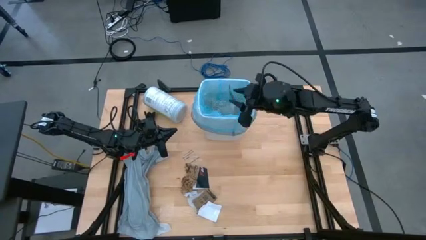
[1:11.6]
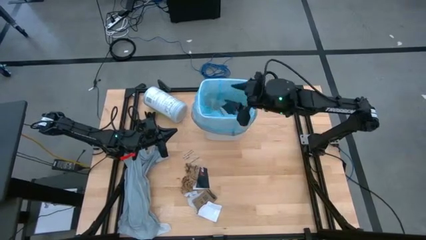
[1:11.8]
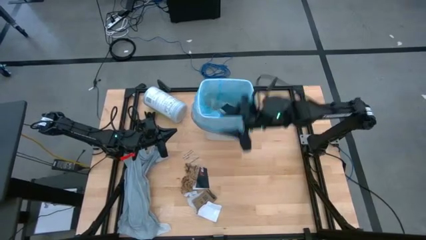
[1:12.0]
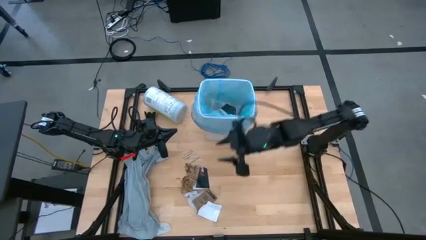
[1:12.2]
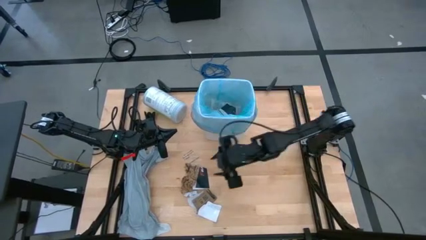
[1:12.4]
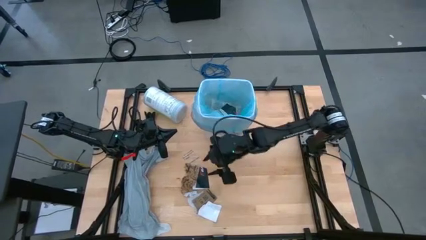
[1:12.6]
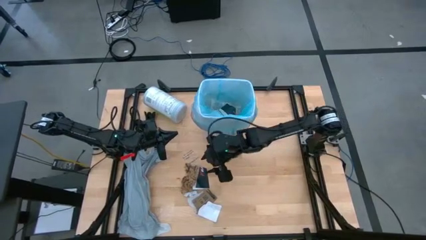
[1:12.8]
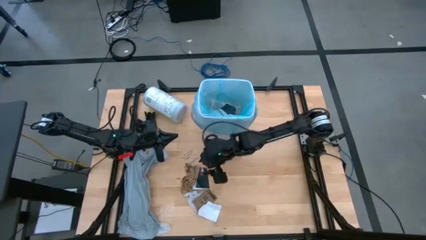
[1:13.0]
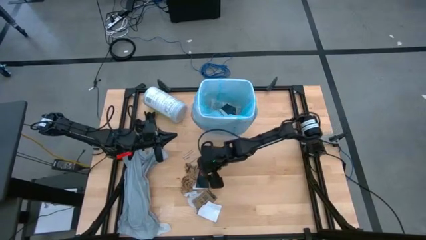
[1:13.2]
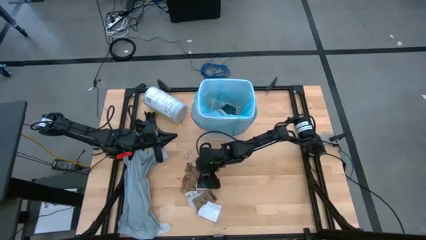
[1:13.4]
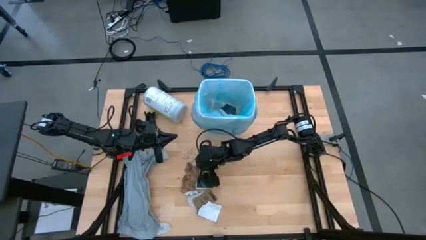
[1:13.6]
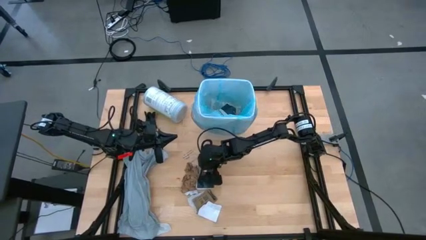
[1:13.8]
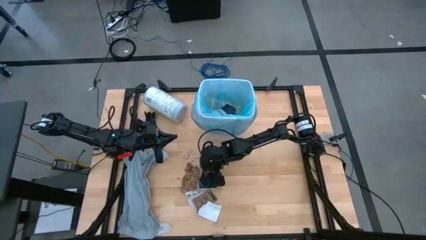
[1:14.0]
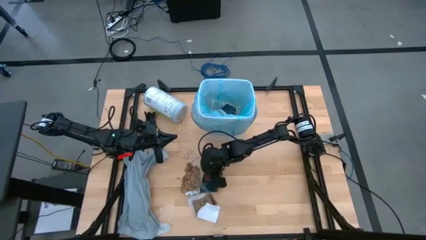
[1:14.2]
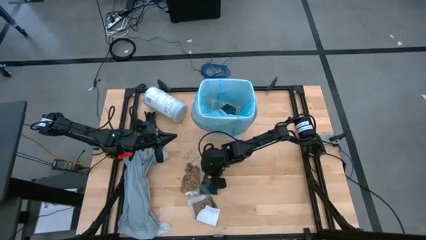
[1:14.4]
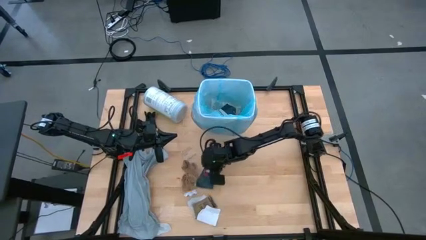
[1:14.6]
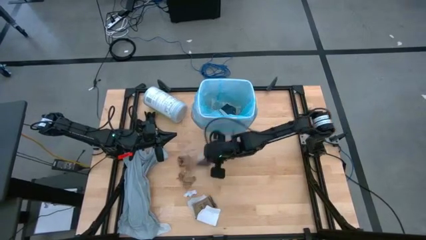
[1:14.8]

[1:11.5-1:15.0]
Task: place trash/remove bag and relplace
Put the white paper into the trash bin

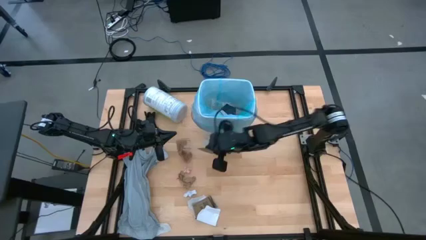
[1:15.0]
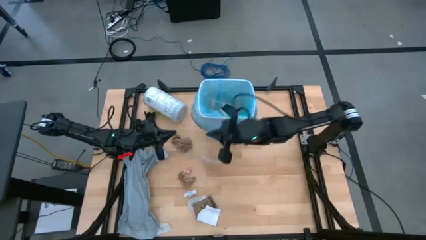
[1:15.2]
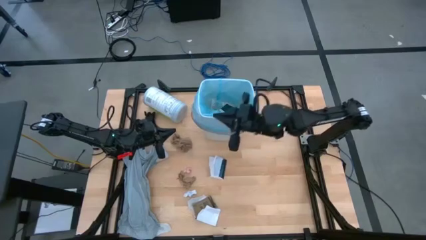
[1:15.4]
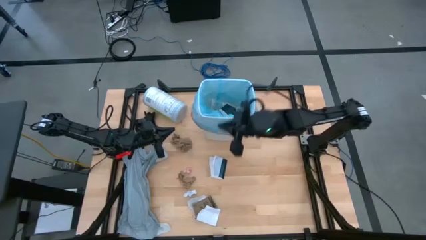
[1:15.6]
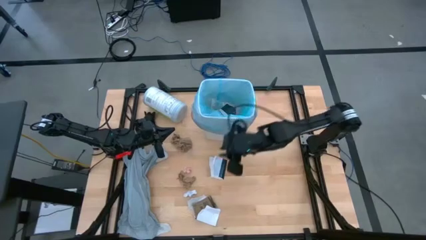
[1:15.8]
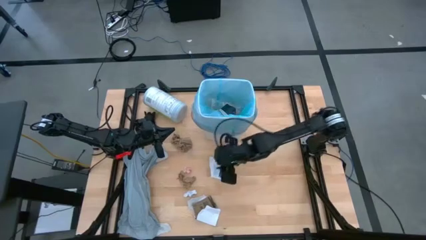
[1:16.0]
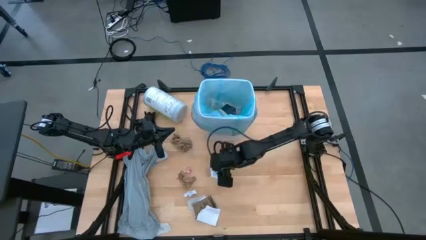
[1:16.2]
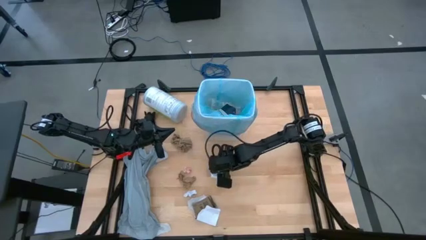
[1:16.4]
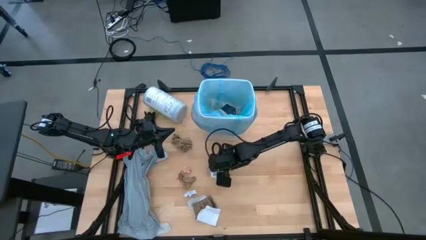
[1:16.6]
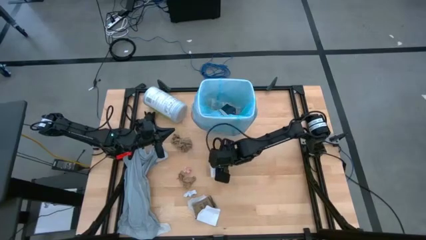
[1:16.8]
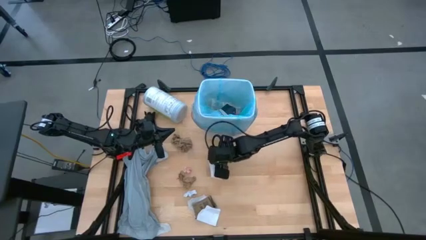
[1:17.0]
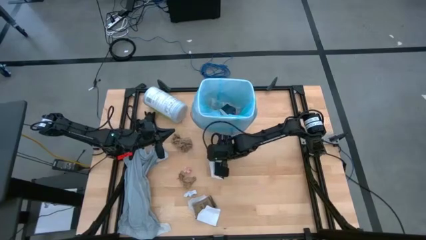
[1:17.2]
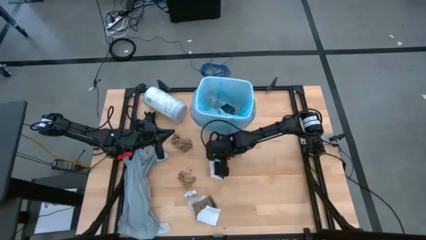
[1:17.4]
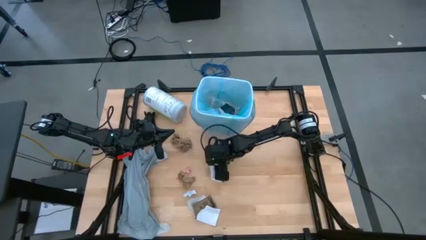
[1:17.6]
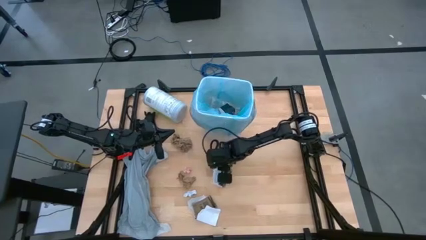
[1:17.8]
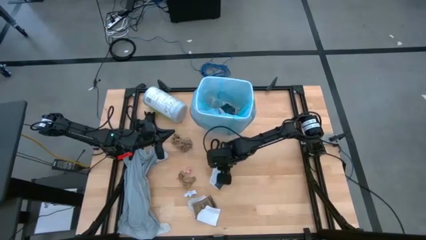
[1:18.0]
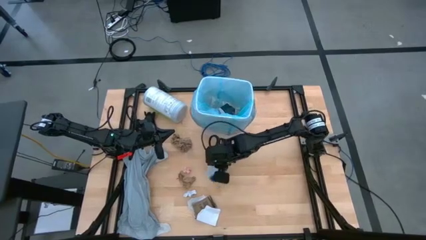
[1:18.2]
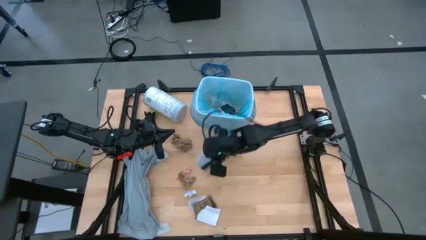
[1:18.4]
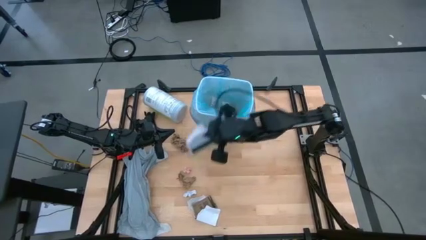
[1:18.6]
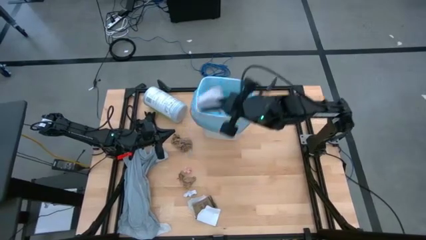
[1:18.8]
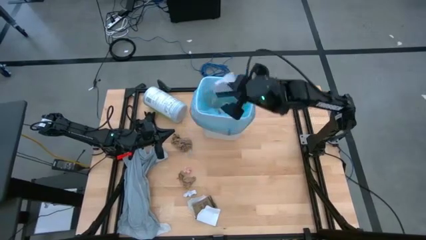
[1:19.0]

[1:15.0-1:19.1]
Put the white paper into the trash bin

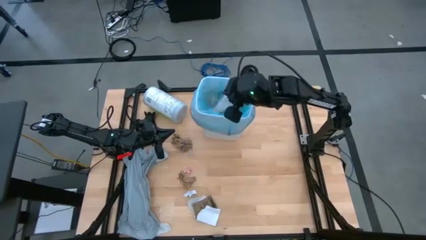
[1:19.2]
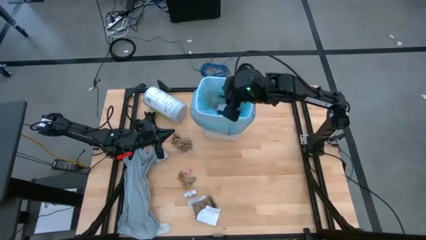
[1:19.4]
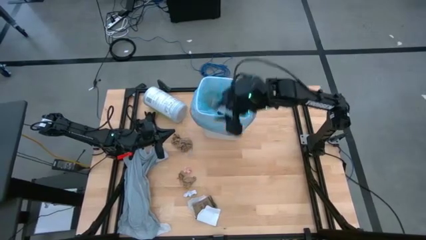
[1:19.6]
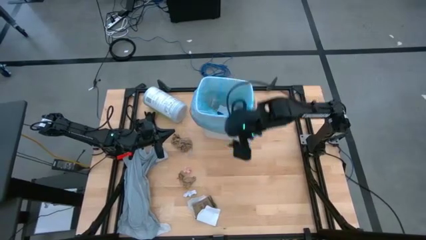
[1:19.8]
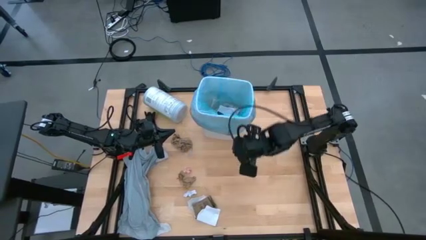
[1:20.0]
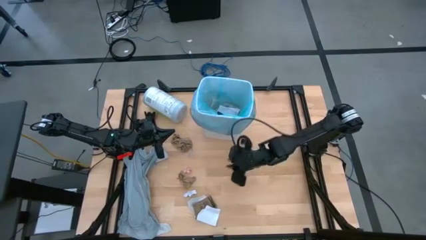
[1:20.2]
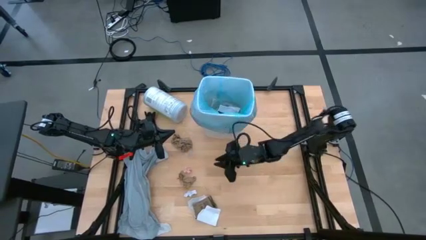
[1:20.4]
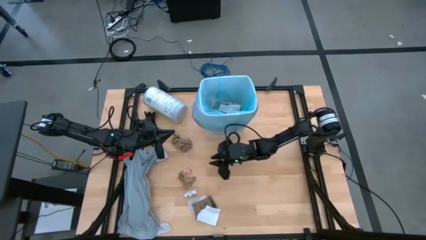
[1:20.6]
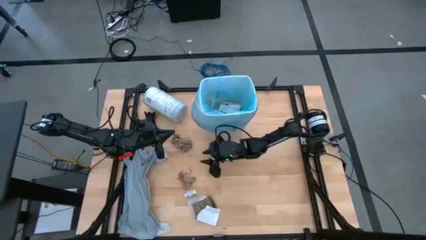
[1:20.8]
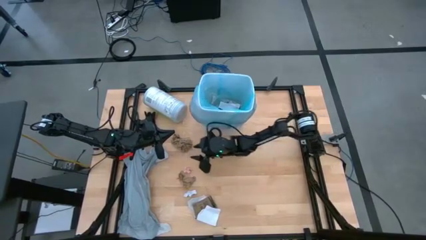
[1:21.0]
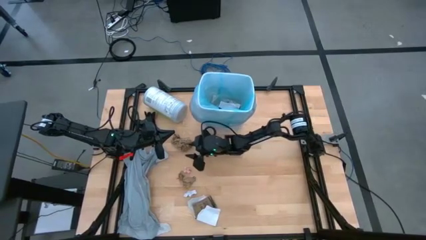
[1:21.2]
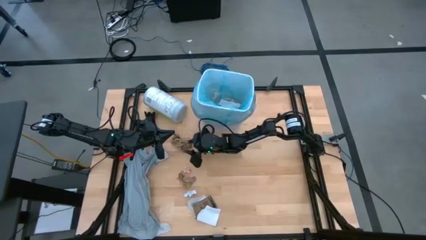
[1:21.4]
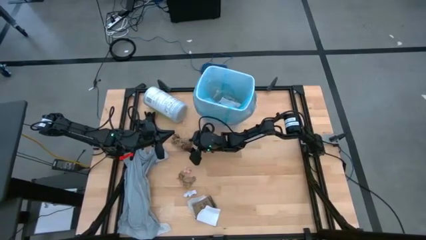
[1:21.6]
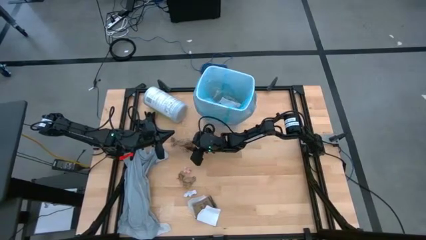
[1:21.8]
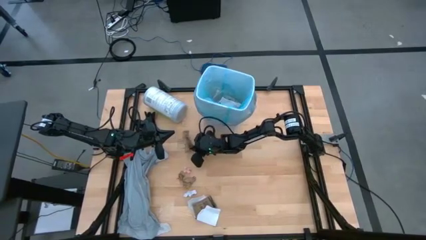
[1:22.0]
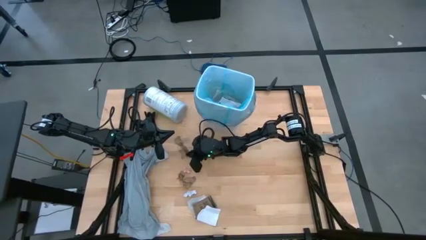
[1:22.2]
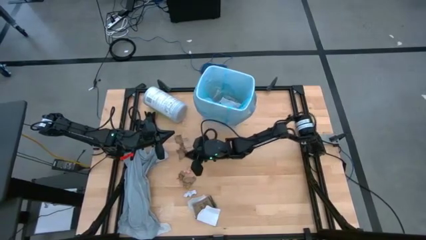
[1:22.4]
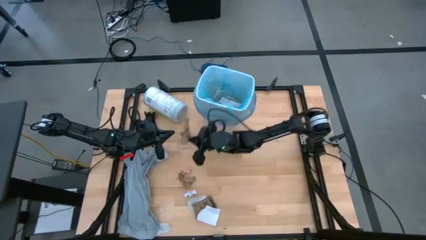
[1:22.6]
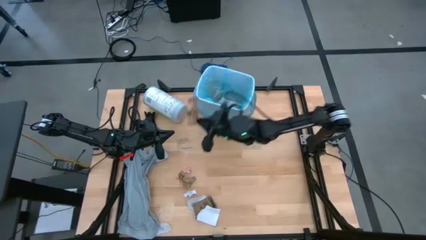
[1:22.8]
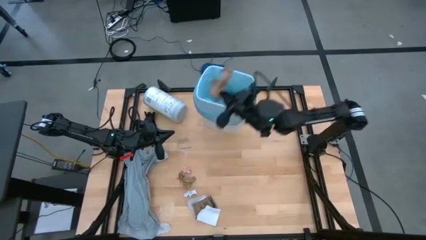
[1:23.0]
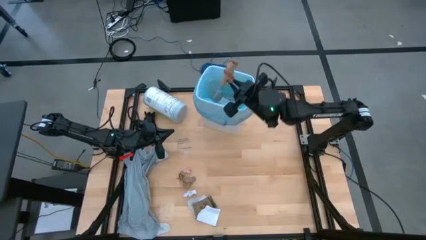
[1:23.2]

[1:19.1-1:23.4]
Put the brown napkin into the trash bin

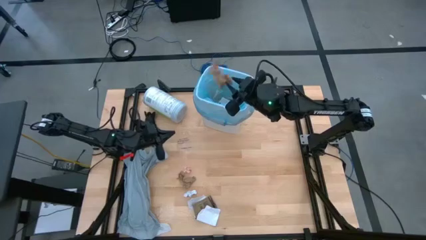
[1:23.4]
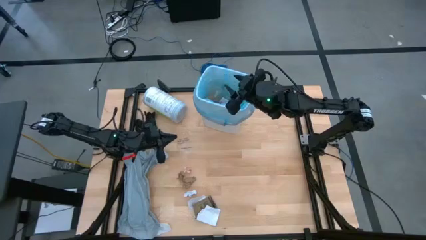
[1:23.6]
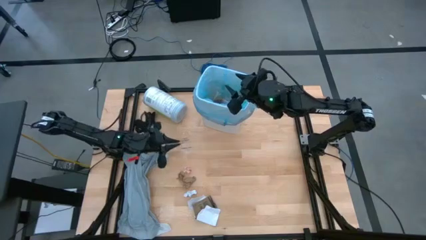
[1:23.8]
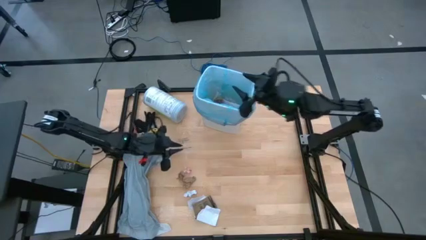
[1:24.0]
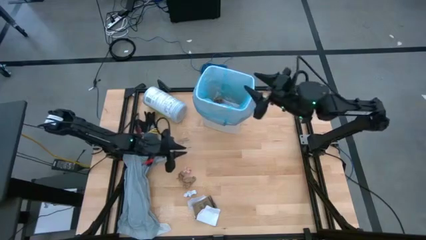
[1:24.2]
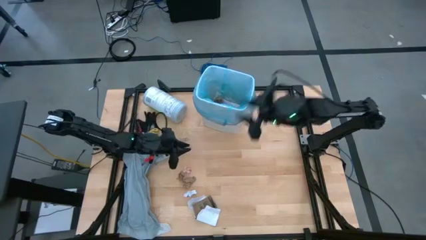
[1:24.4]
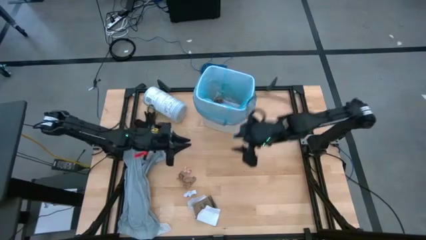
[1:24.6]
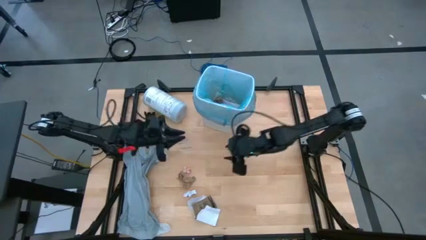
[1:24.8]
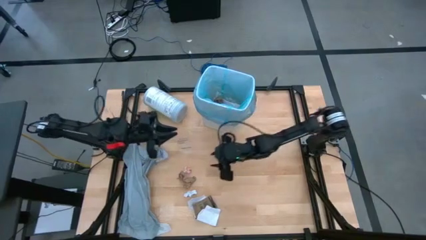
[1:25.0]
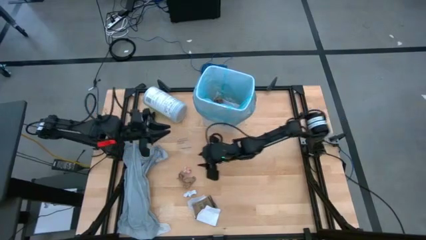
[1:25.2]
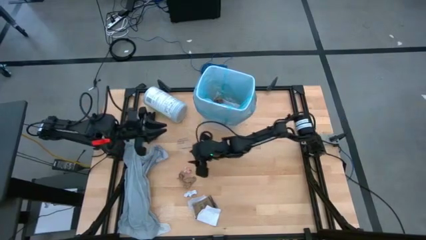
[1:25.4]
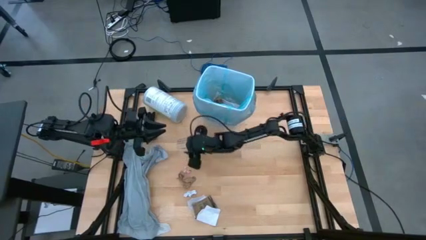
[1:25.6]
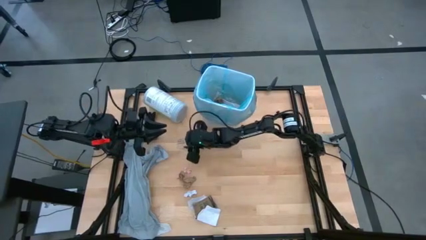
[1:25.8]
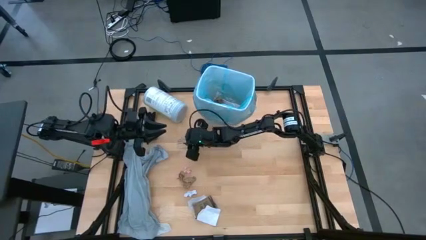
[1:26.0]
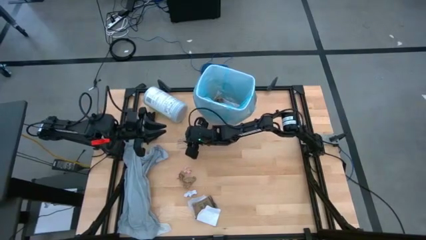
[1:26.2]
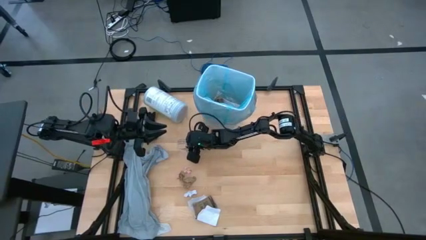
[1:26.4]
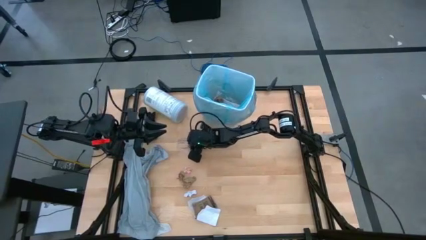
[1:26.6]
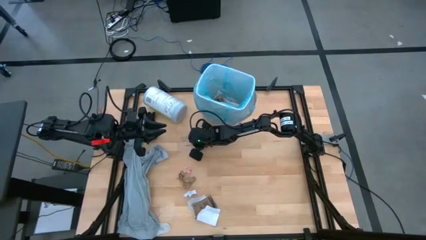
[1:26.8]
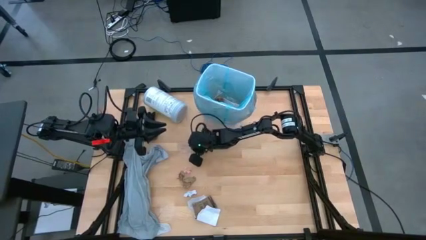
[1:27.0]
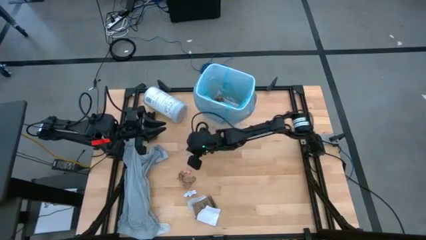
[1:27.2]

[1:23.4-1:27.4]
Put the transparent plastic into the trash bin

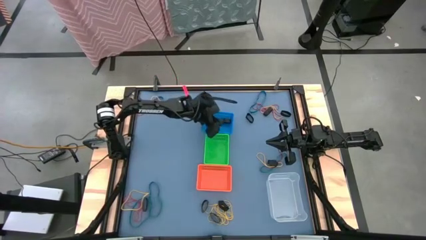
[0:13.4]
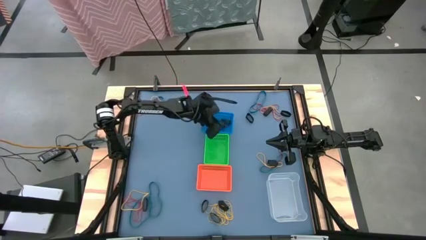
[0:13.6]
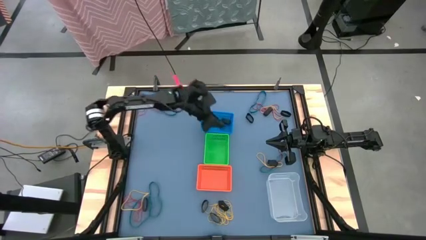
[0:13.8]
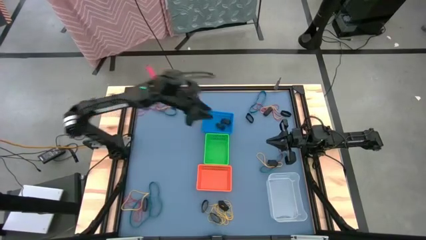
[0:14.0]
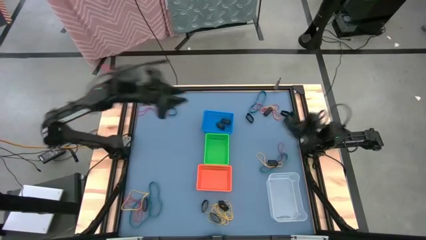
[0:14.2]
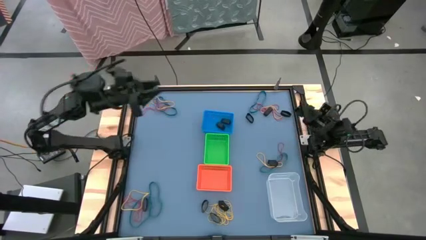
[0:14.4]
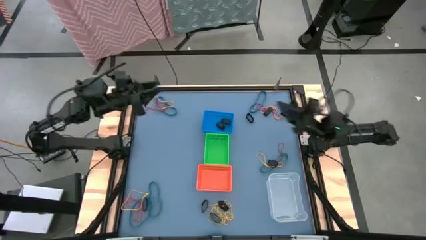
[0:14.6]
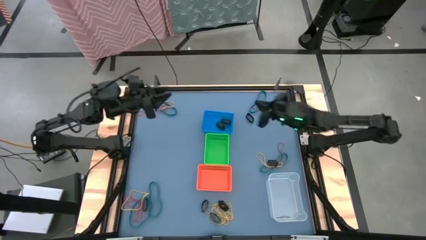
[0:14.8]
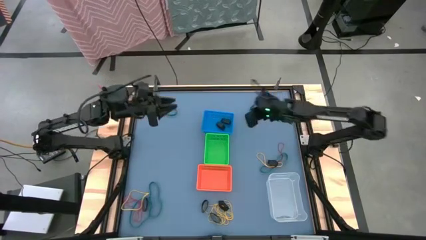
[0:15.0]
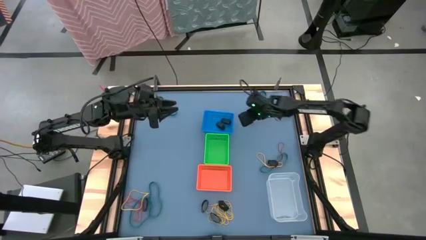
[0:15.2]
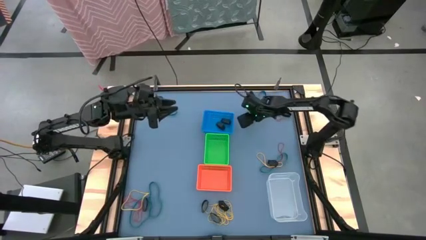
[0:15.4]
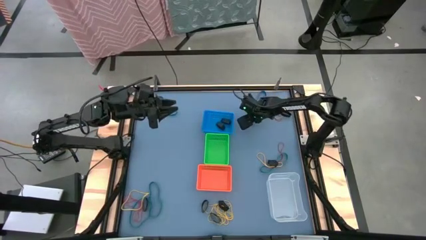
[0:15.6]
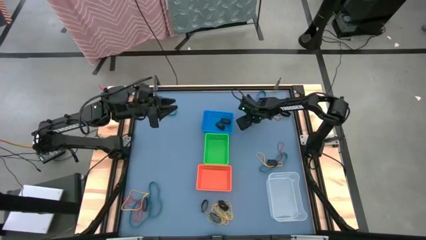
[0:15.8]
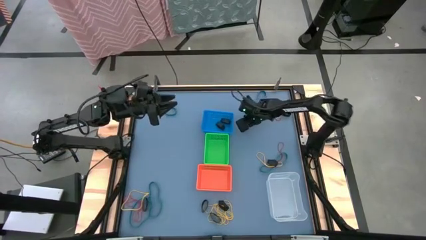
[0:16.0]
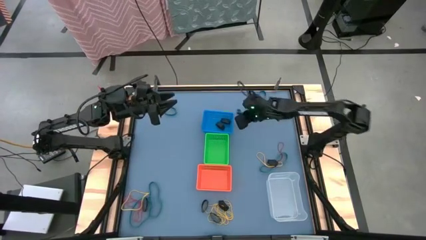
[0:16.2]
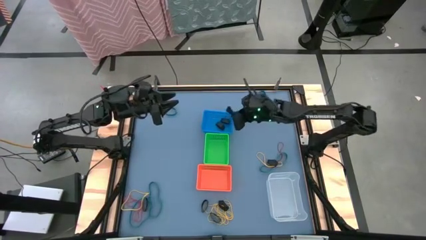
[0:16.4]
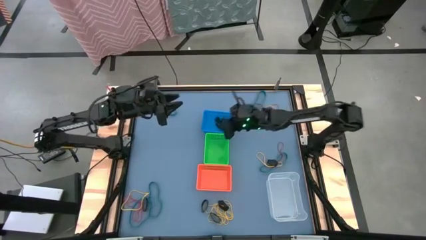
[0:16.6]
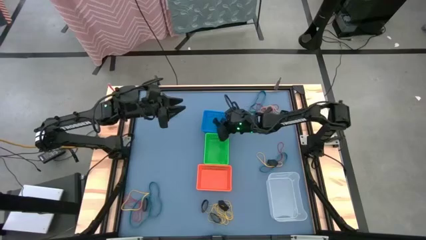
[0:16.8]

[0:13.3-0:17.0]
Task: Sort rubber bands into baskets
Put the black rubber band into the blue bin
